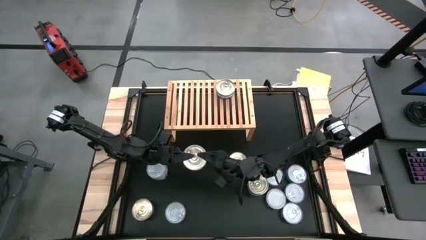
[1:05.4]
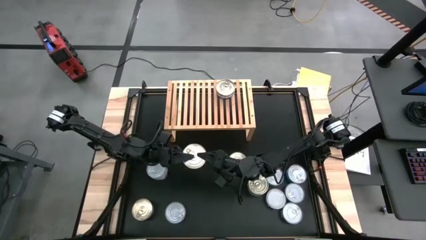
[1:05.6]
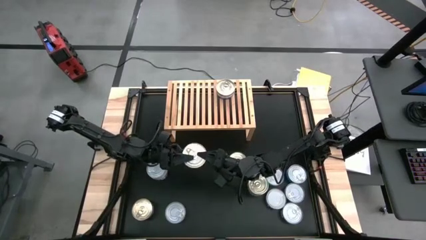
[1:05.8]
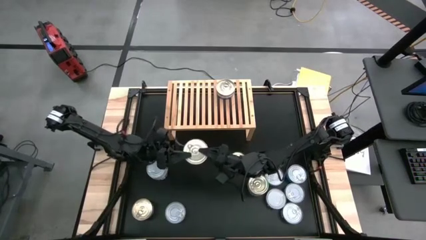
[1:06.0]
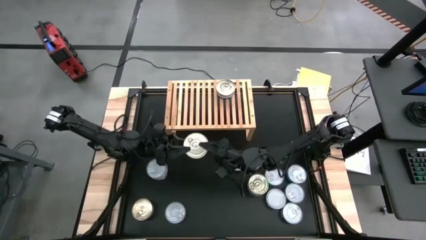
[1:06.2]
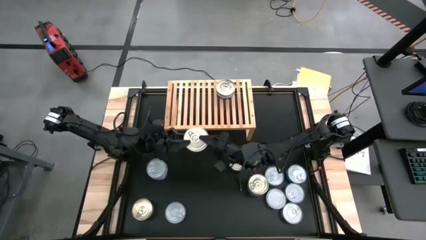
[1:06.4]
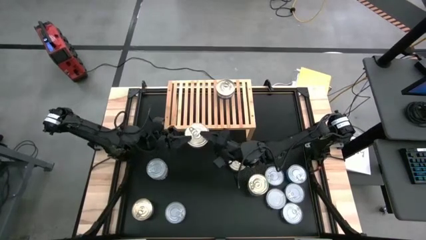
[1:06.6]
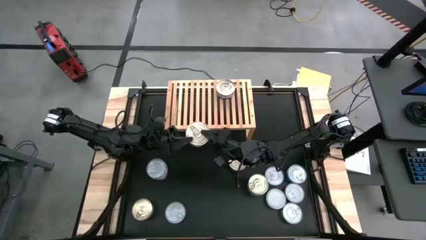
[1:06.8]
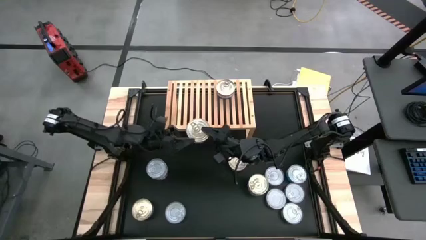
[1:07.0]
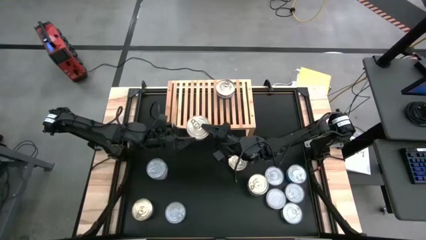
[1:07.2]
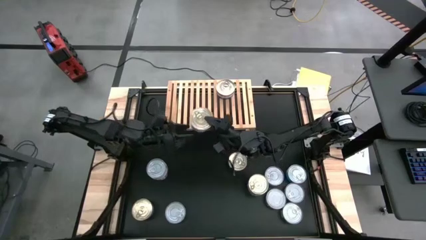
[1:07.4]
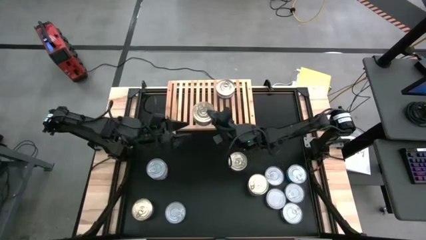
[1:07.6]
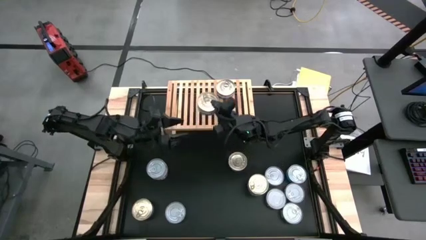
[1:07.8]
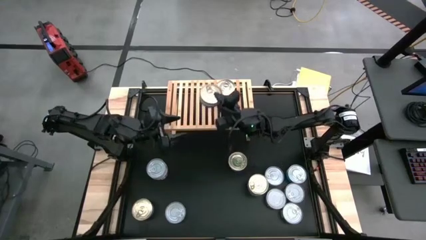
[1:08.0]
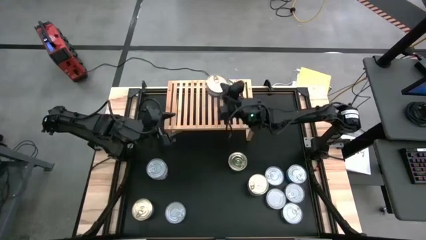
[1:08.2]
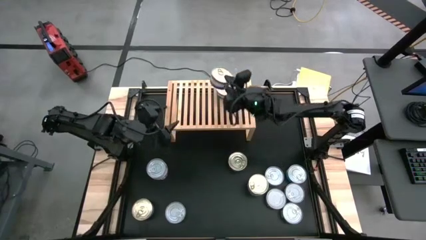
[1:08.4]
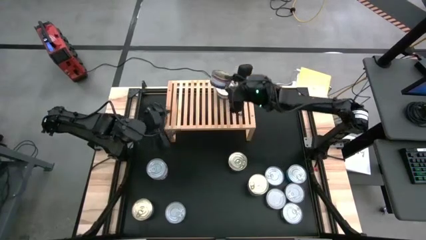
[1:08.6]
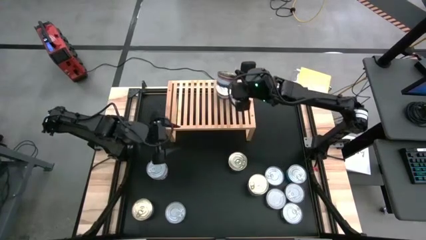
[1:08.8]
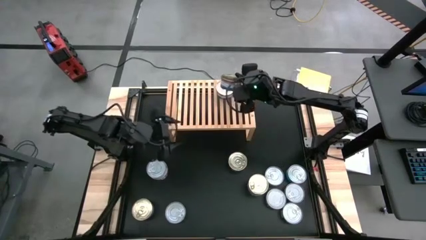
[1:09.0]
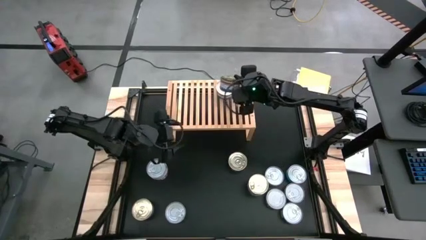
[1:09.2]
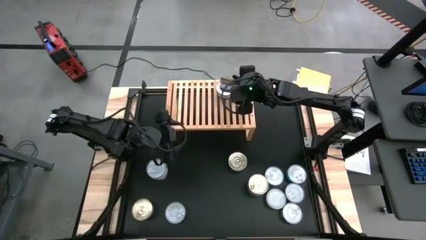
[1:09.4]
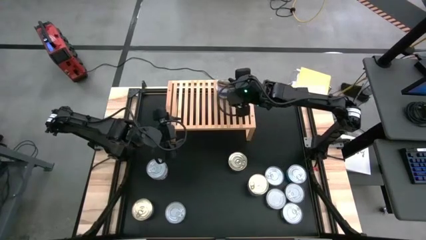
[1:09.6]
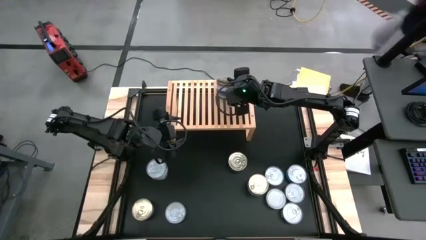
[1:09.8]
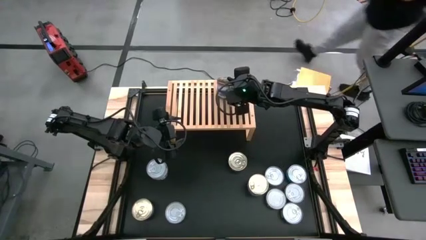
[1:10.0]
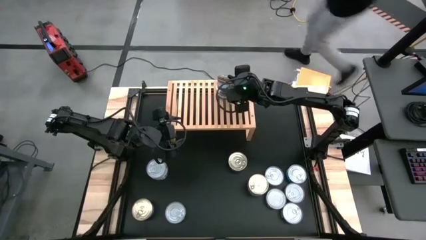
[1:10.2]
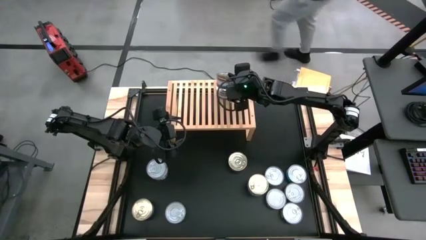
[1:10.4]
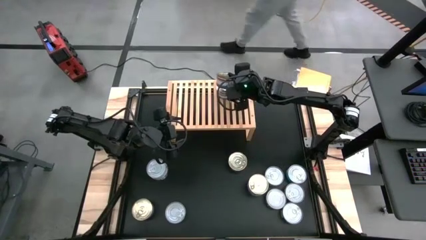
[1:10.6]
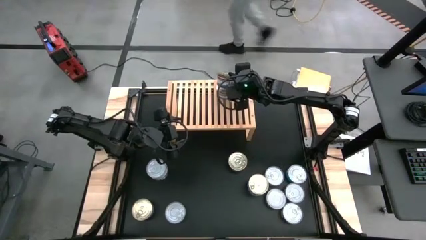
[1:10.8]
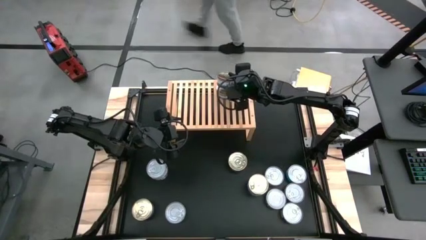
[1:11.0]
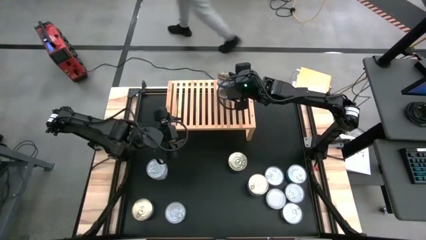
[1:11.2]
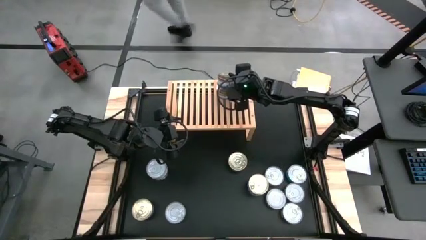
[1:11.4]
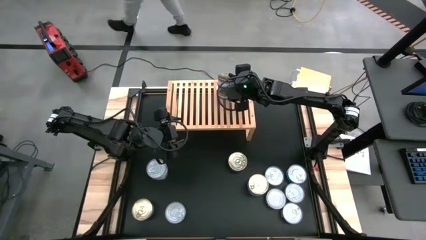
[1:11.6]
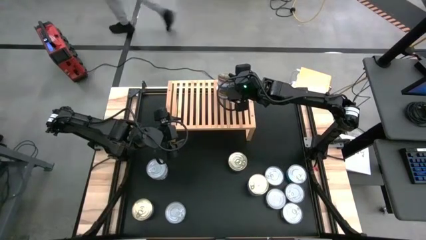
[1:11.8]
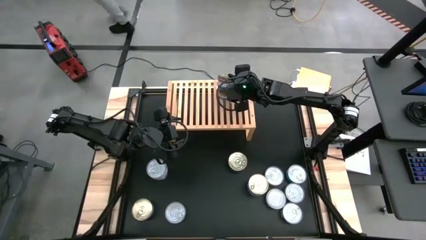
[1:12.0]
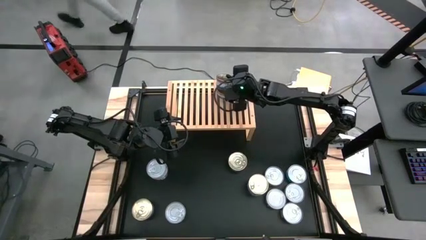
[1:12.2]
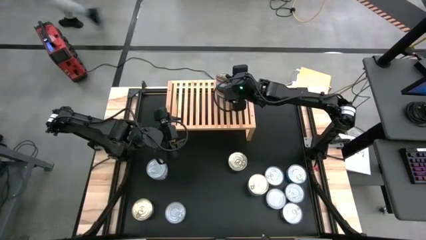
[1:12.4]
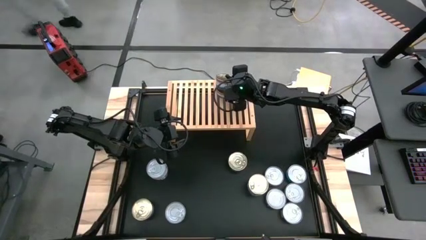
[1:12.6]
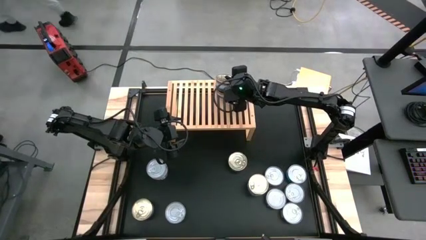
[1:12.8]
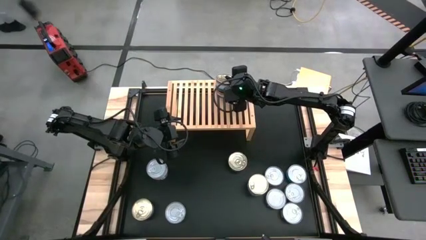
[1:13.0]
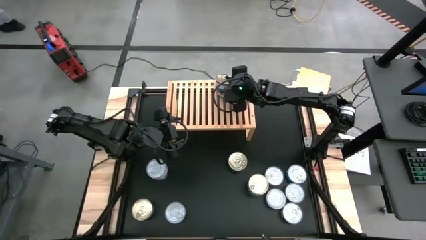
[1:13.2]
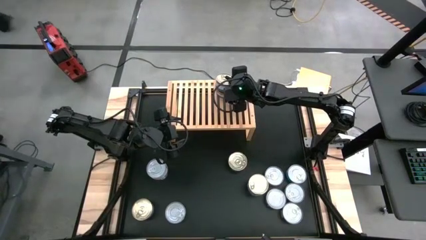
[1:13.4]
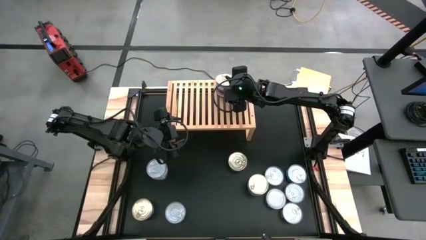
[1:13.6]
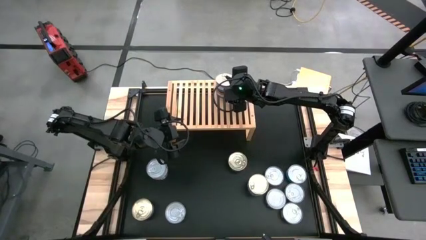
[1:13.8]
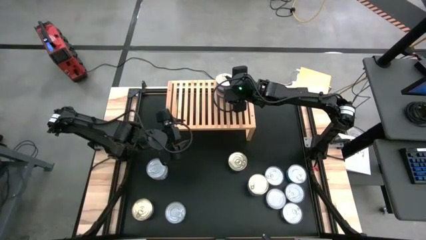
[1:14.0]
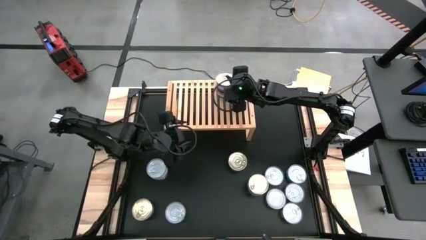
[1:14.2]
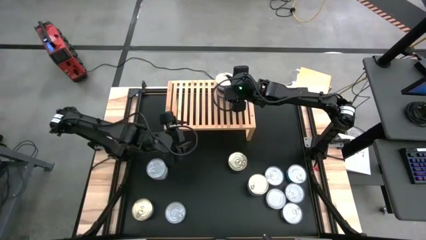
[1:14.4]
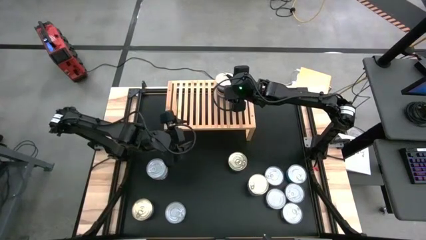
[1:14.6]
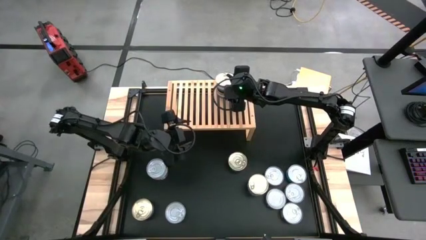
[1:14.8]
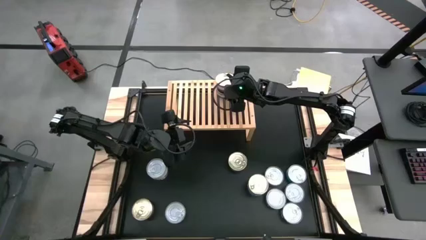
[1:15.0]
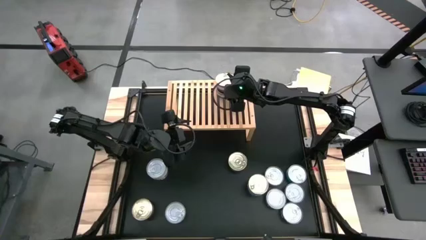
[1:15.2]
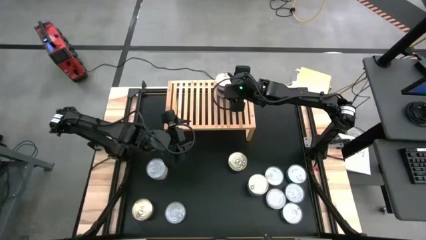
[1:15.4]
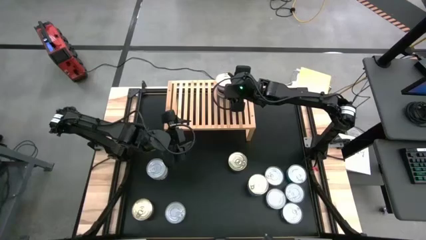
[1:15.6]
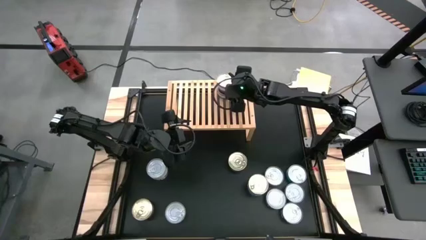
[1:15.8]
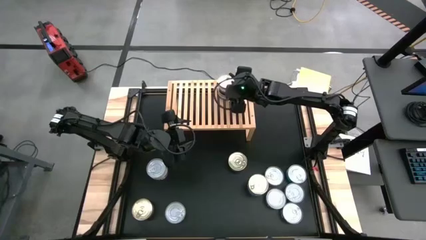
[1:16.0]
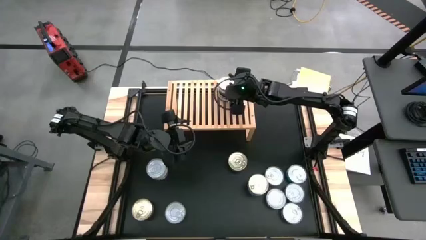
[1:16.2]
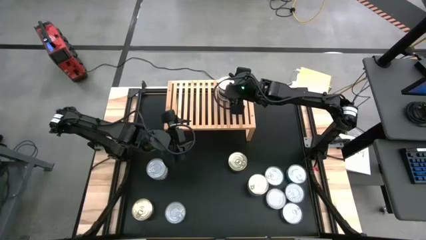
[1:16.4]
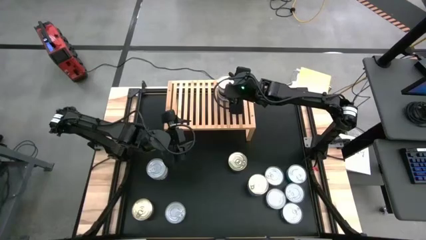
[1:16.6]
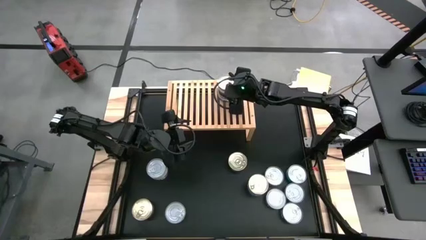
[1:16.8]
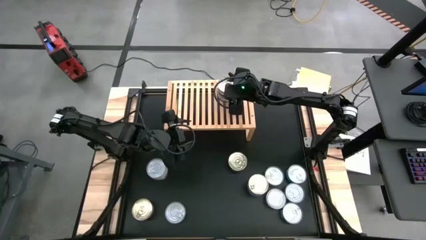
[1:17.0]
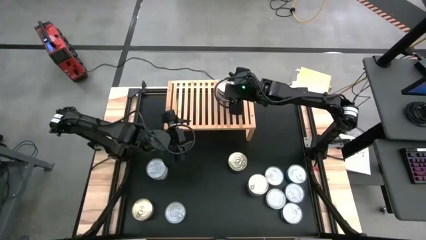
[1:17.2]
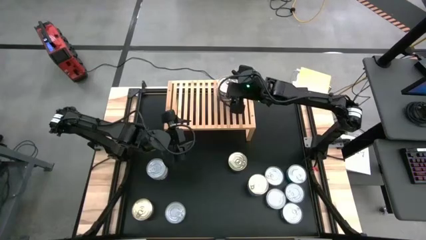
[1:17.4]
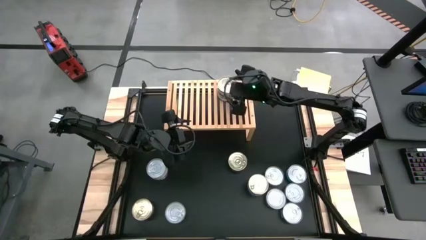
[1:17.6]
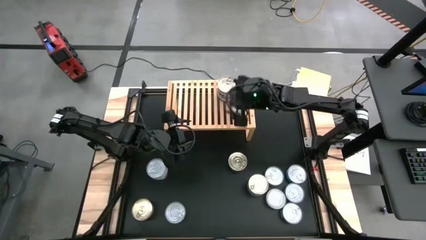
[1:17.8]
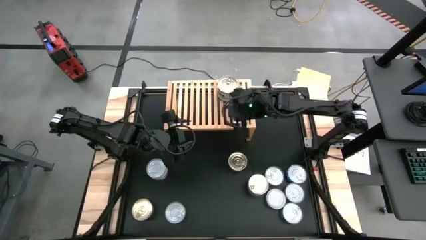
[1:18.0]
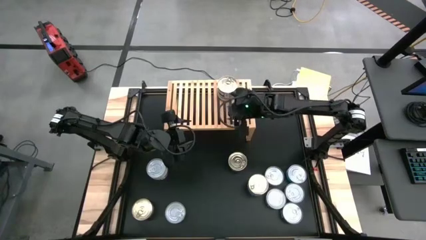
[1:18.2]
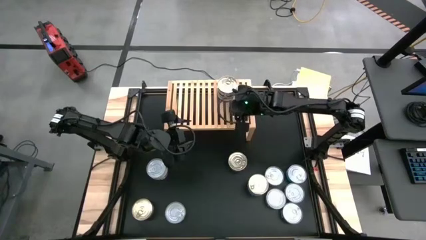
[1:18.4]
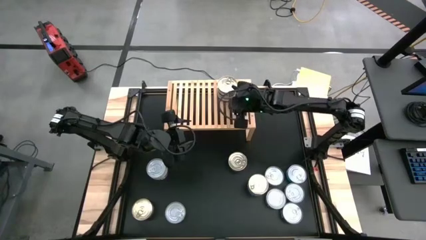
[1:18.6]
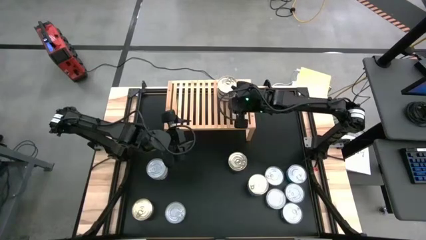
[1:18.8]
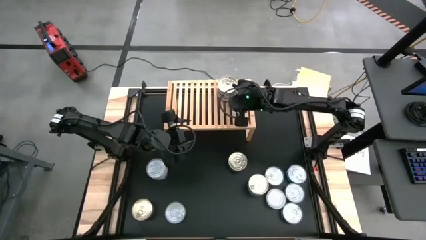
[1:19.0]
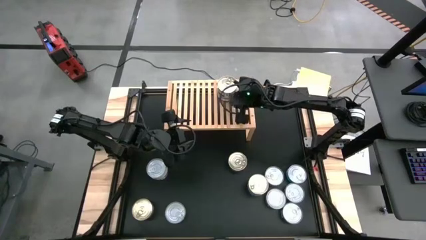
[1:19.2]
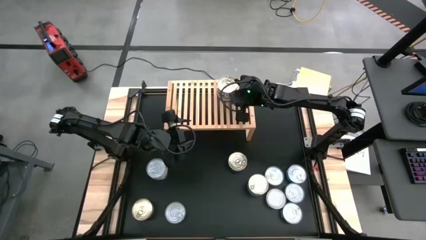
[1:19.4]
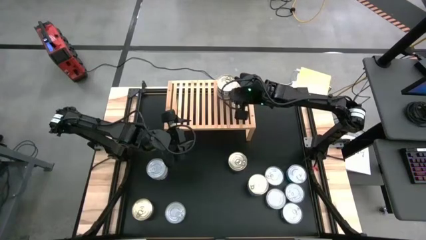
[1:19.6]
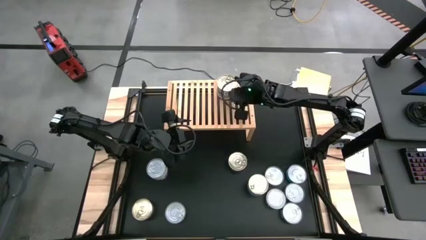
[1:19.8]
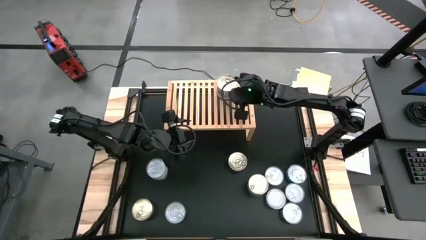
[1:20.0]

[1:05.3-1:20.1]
Task: Stack canned seafood by type on shelf
Stack the blue and pink tuna can on top of the blue and pink tuna can

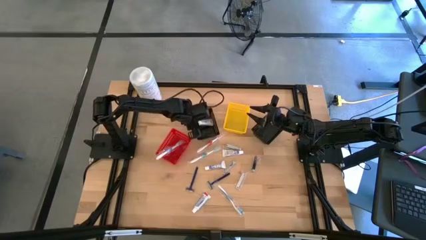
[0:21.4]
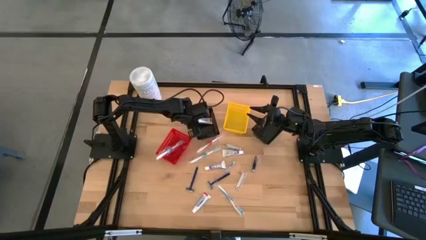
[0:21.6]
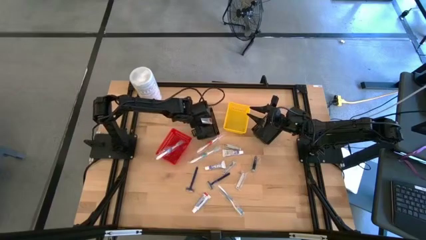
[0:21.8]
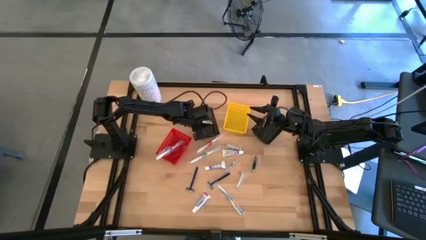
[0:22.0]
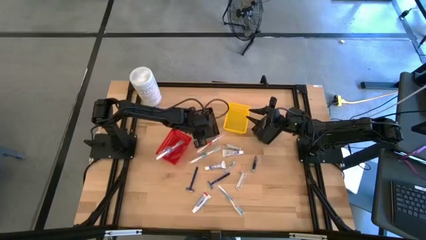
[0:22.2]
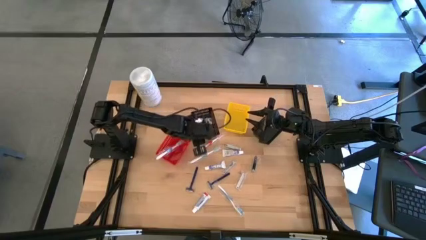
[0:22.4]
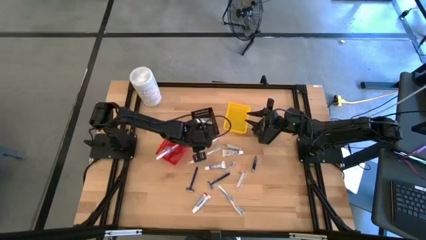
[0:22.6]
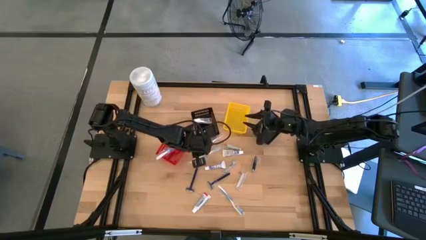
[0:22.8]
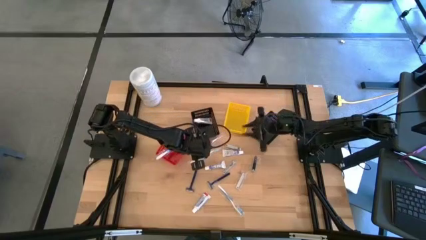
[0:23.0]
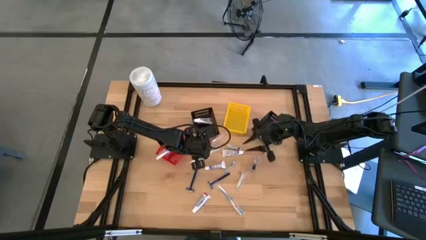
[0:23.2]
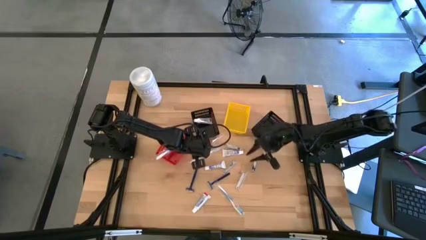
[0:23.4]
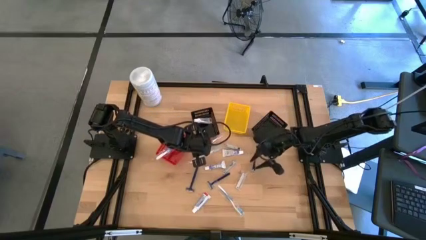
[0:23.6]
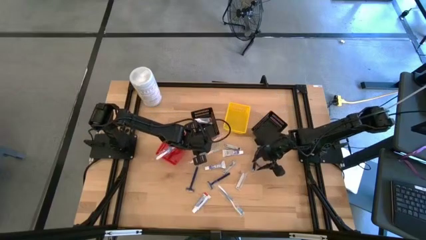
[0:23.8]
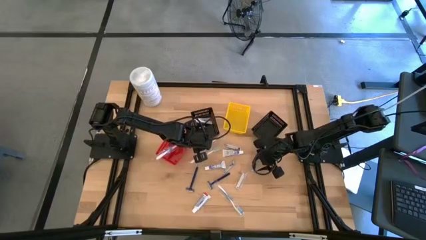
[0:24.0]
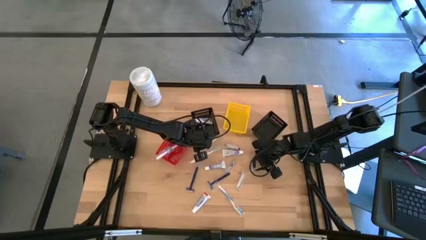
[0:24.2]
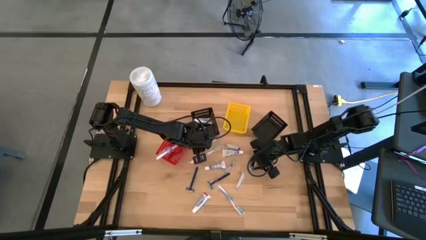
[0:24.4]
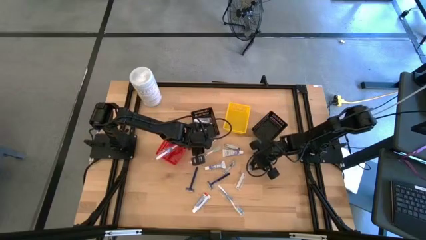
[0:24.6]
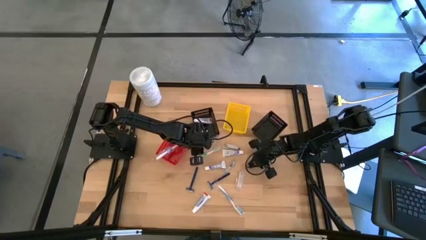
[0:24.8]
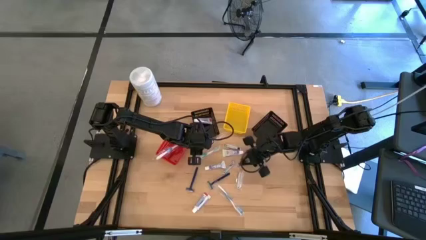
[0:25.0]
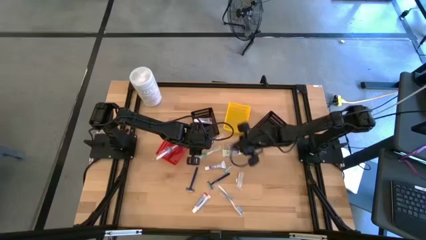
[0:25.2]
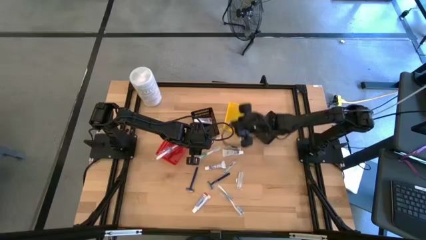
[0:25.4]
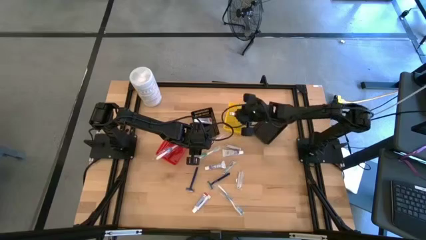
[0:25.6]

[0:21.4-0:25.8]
Task: Pick & Place Travel size toiletries
Put the nail cutter into the yellow bin
